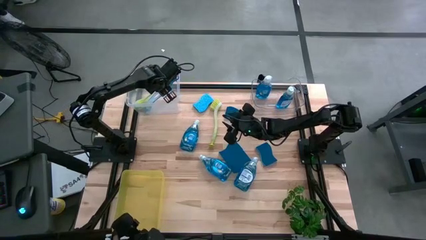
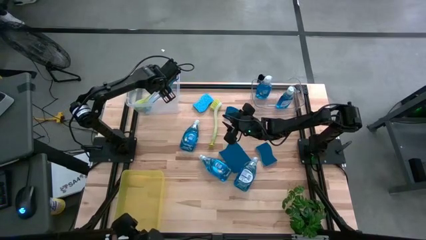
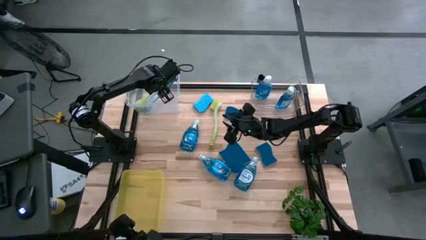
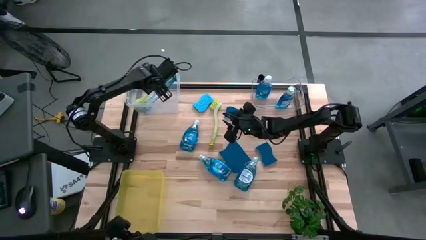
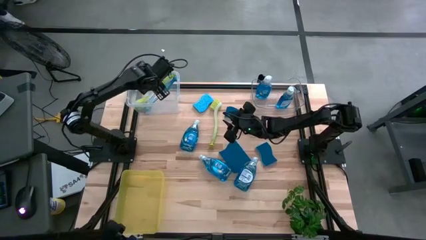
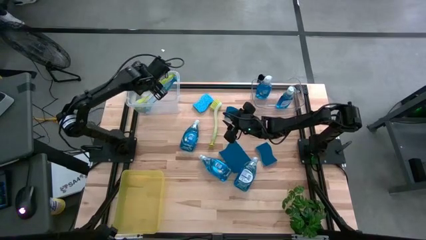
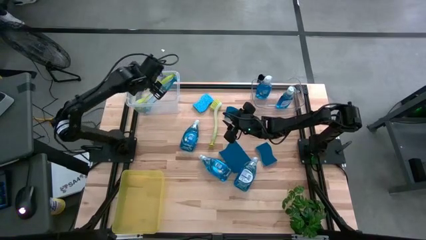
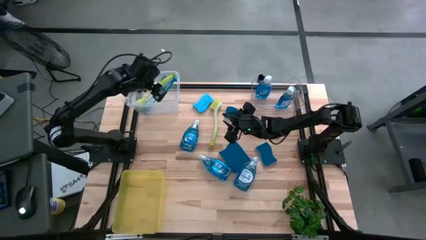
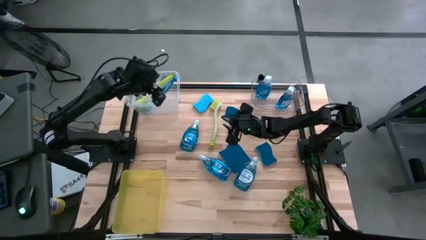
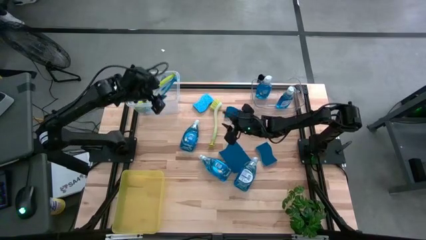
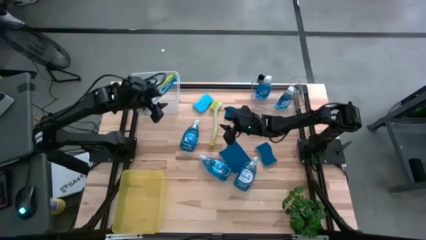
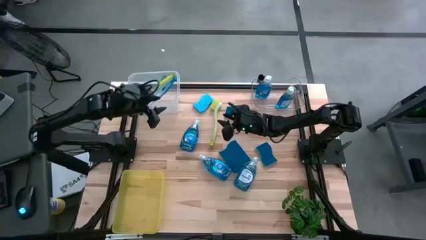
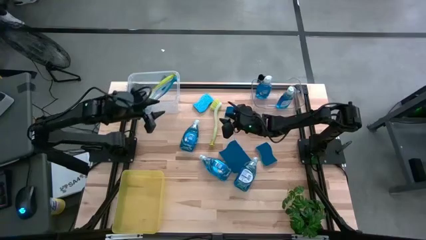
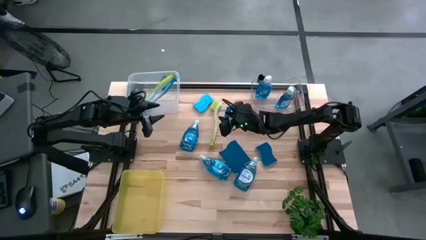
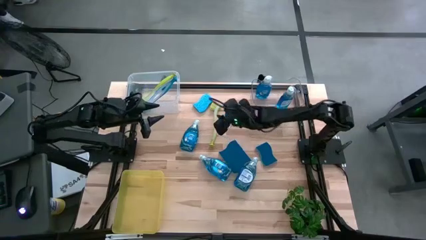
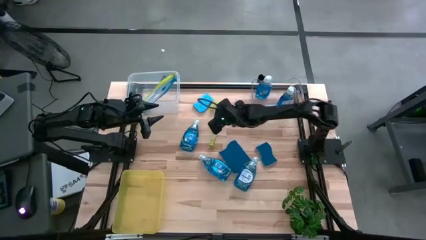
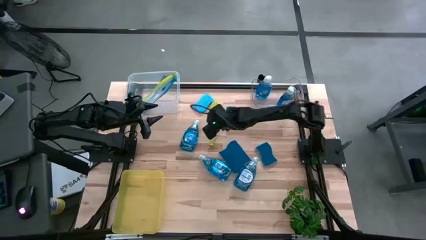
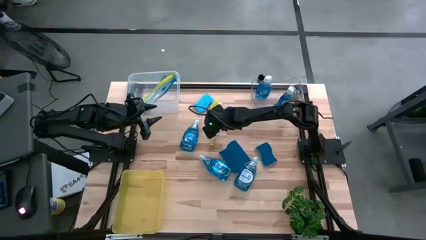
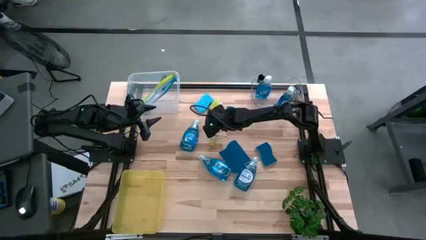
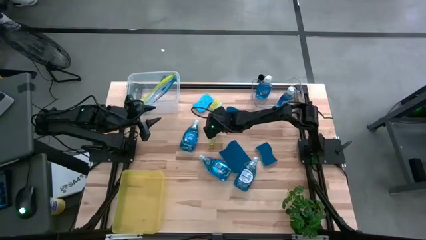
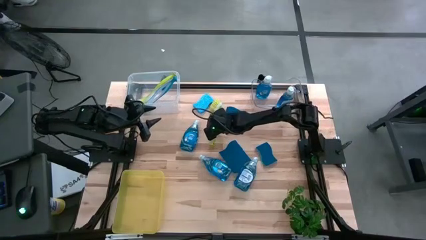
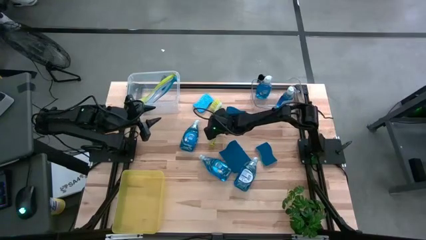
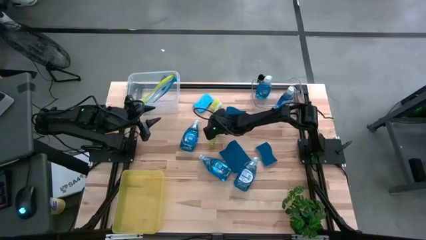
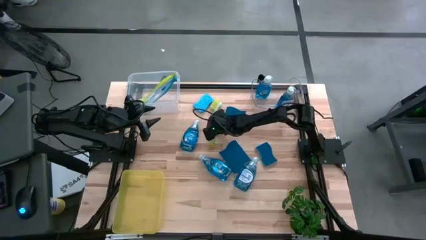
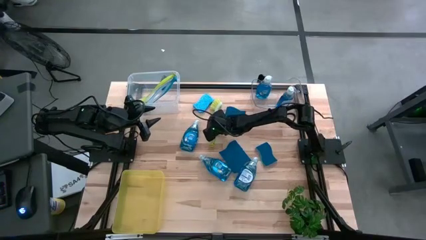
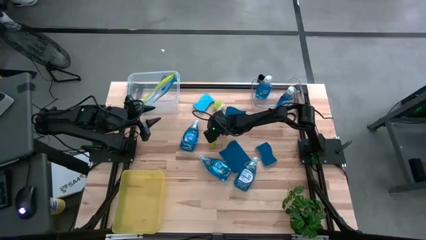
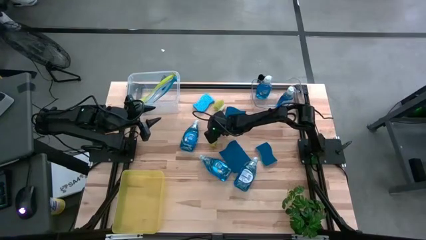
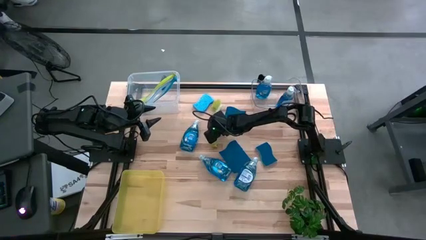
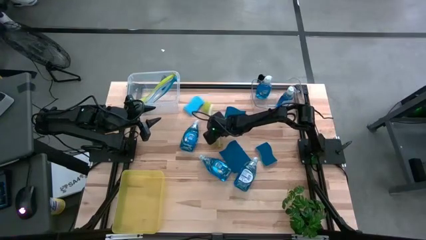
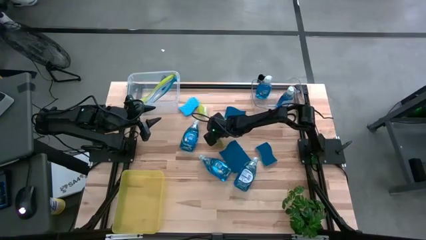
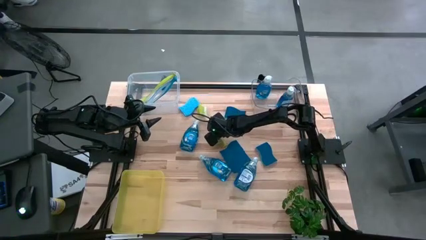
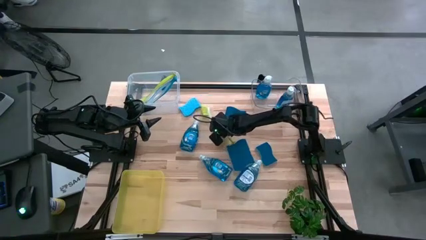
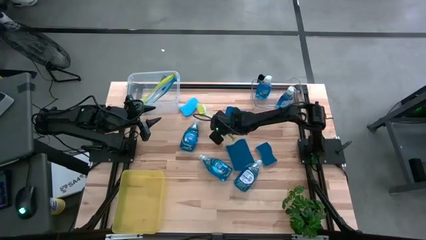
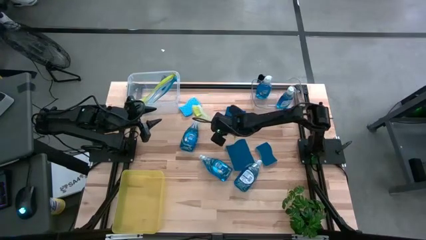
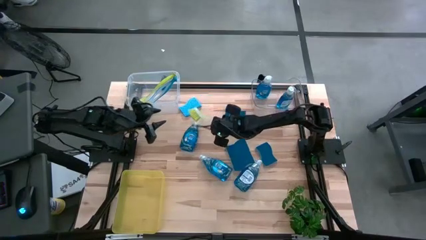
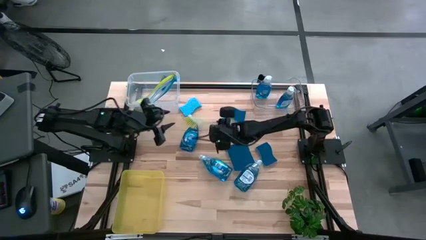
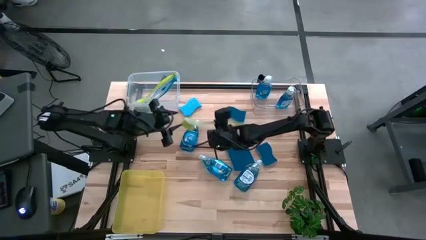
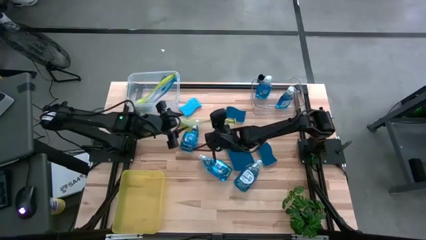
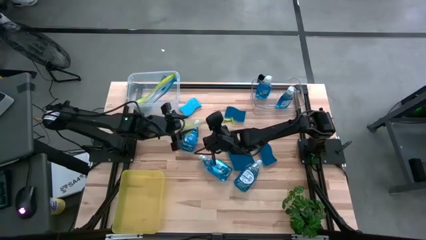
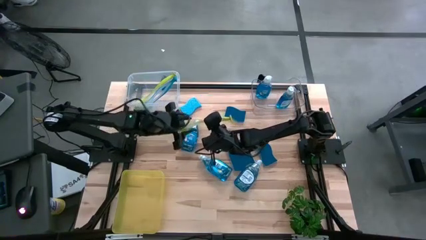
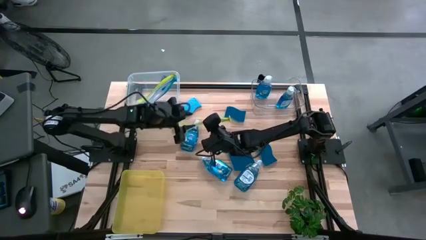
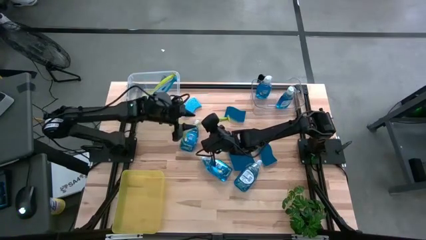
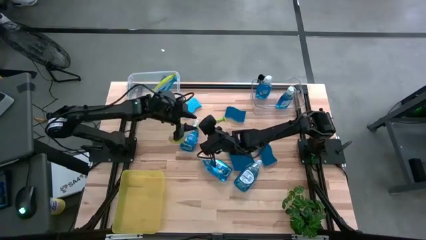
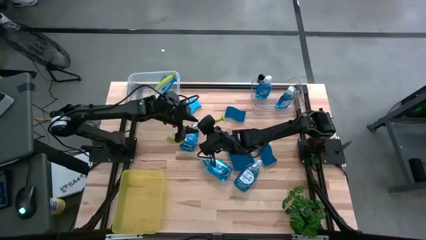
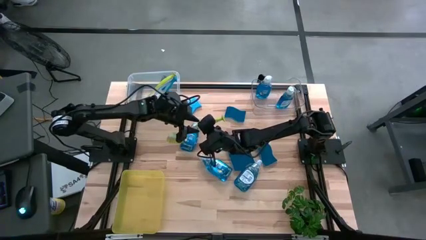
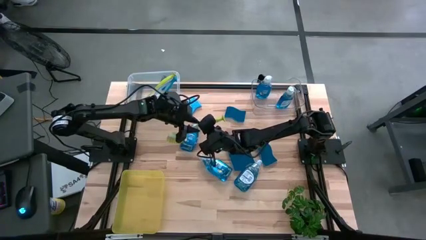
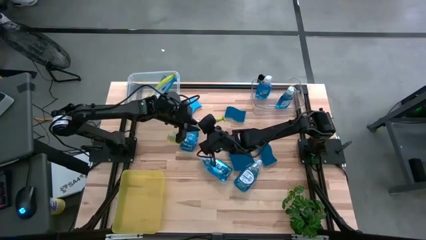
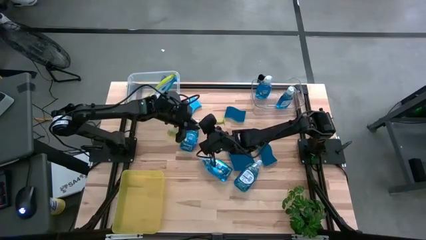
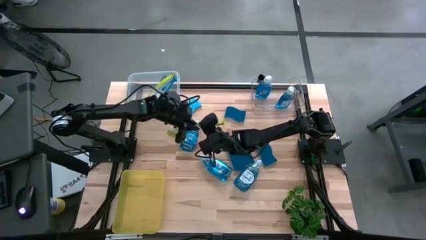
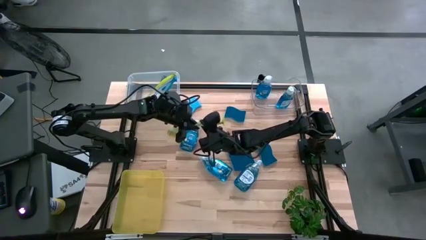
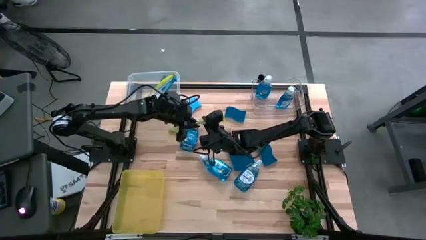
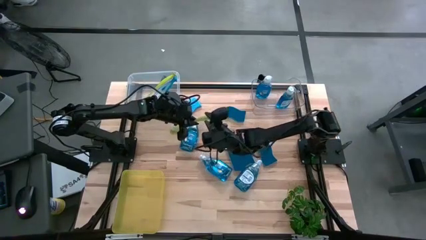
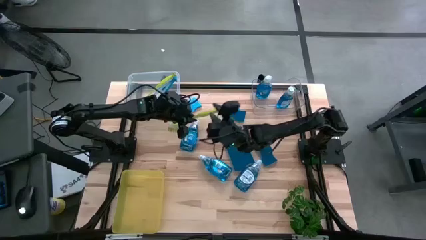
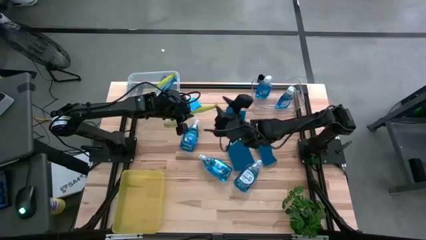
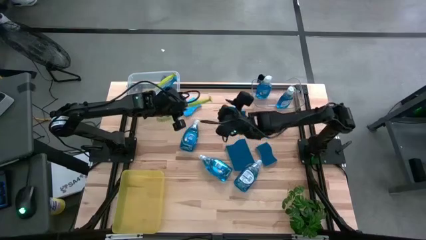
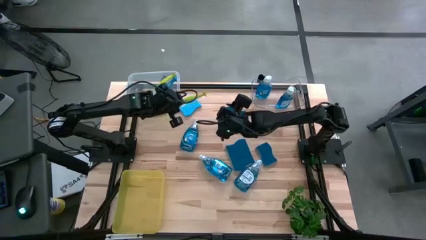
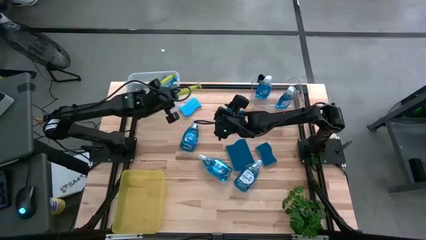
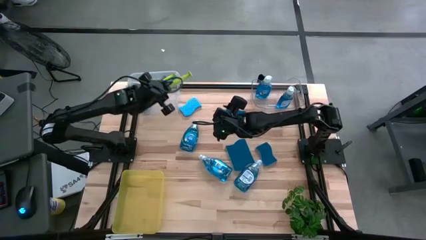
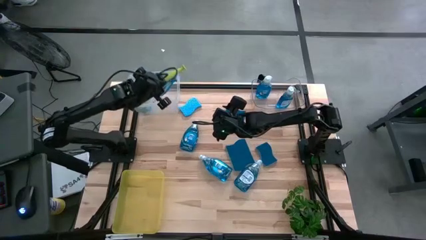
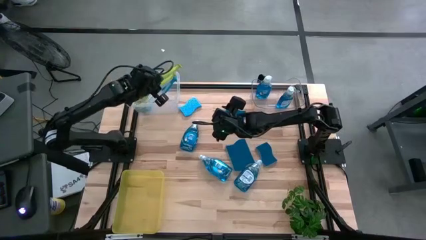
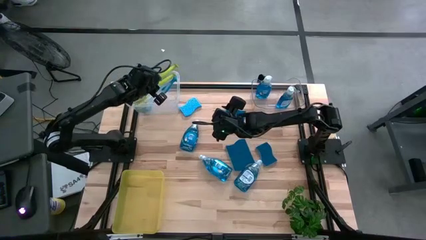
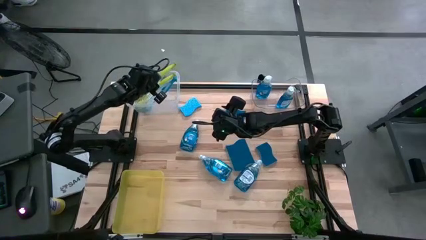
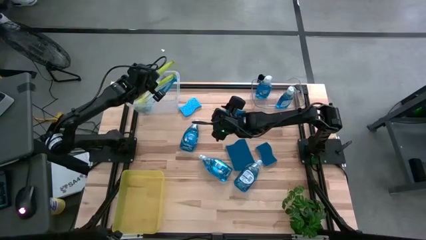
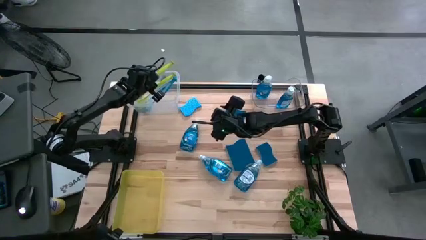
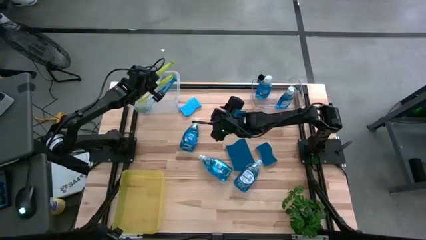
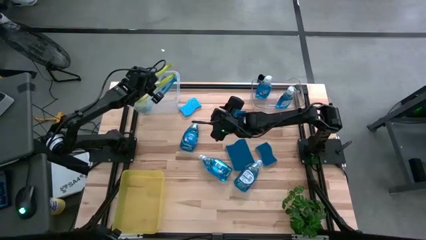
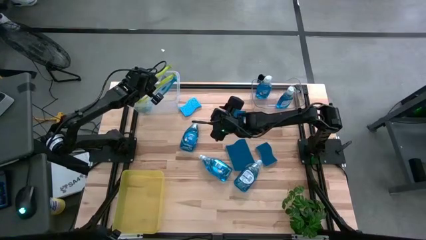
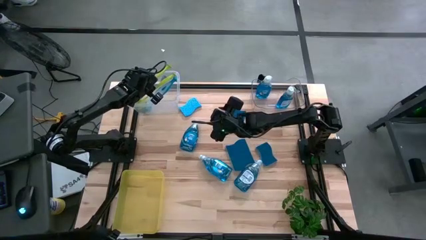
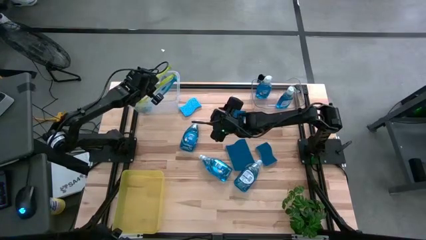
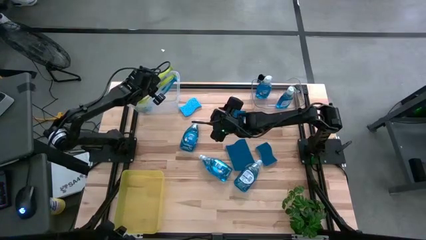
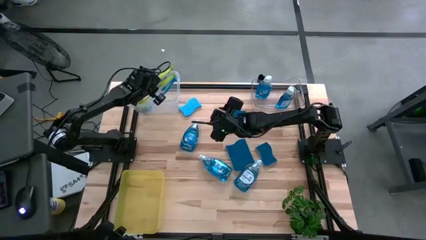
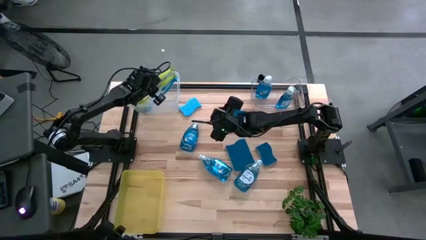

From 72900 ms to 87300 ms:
Task: Pick & Place Kitchen Sink Supplies
Put the yellow and green dish brush into the white transparent bin

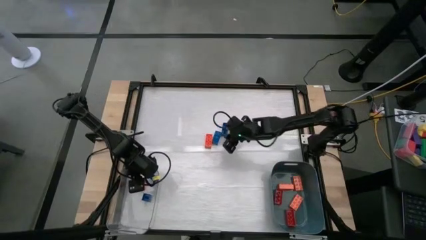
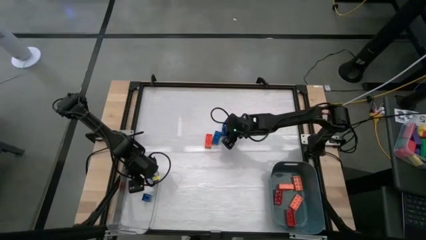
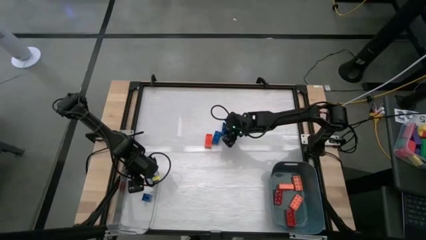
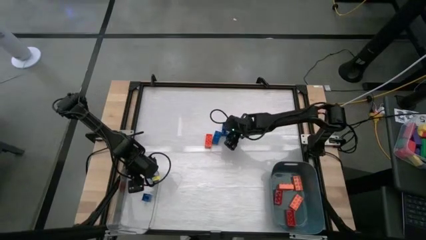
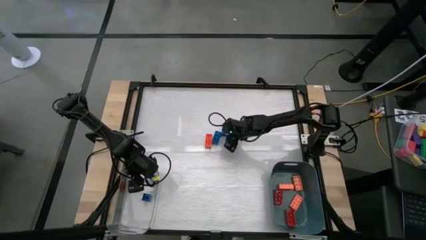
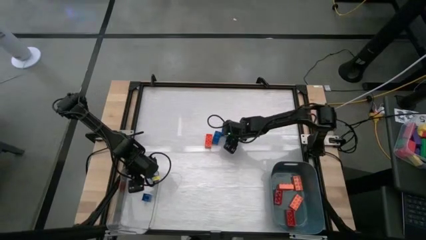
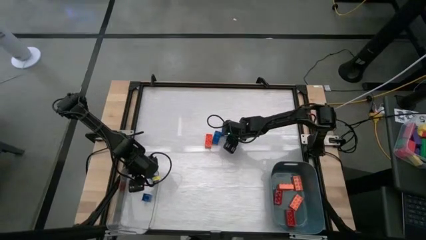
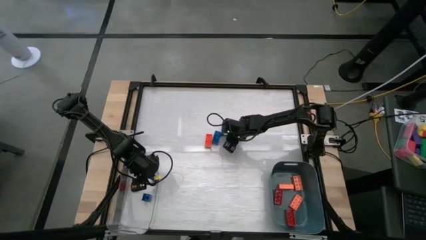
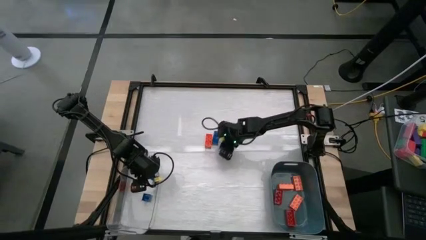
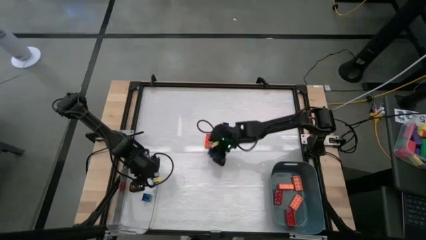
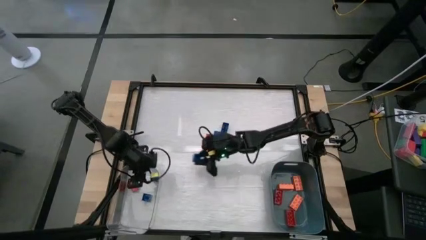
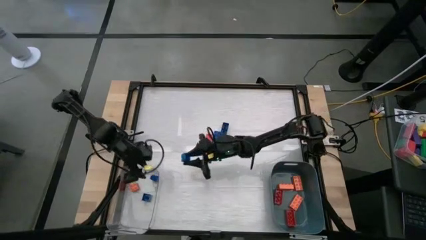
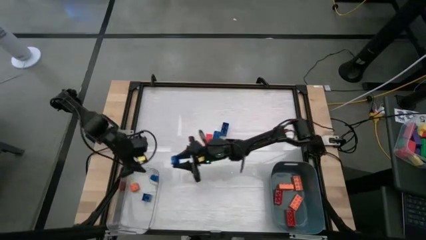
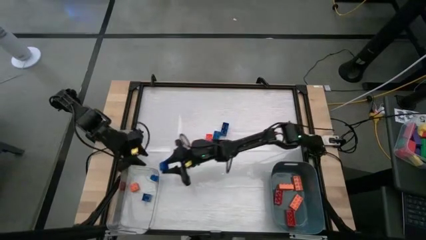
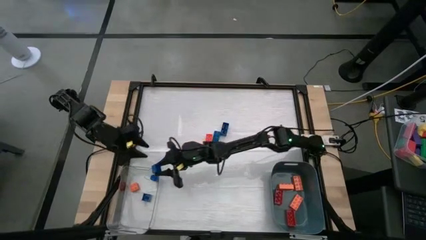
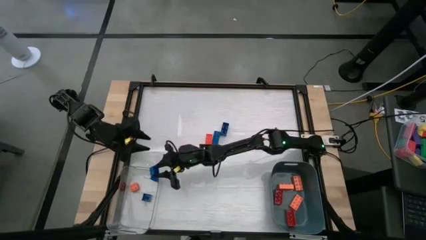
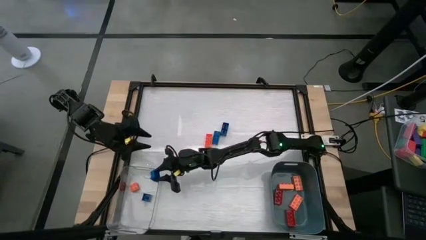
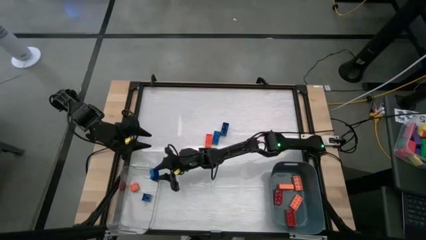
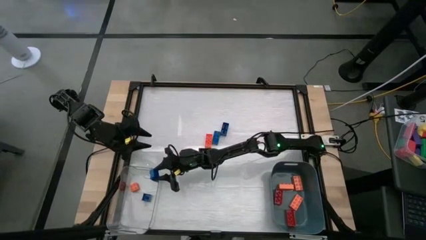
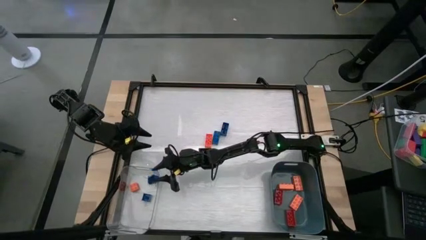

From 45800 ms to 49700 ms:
Task: Sort blocks by size
Put the small blue game piece into the transparent bin
